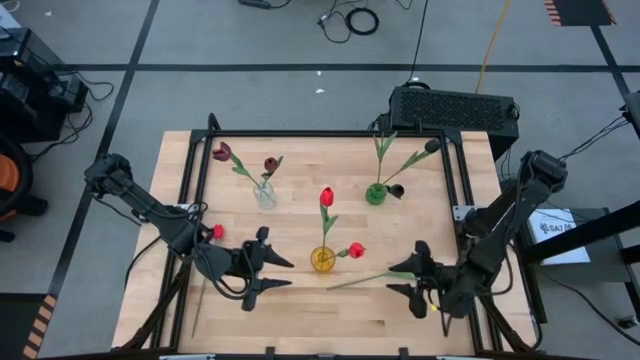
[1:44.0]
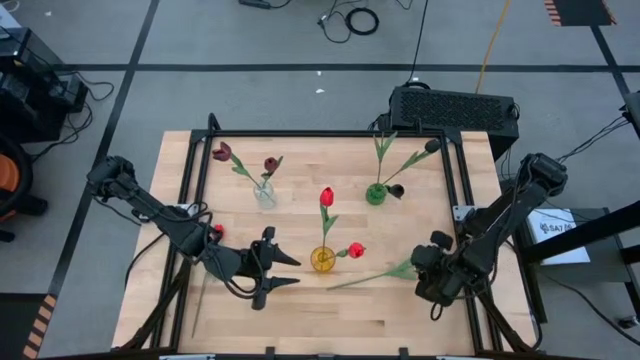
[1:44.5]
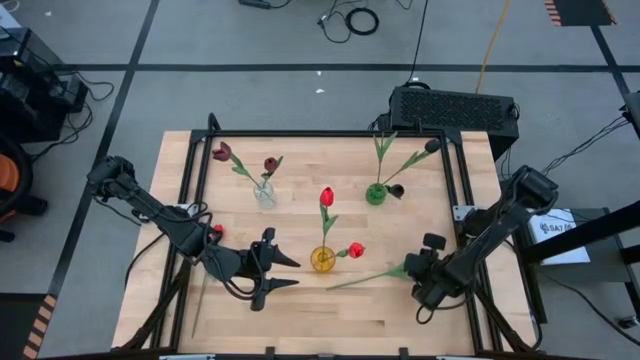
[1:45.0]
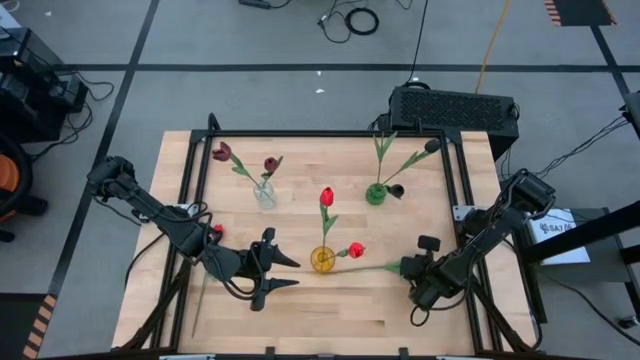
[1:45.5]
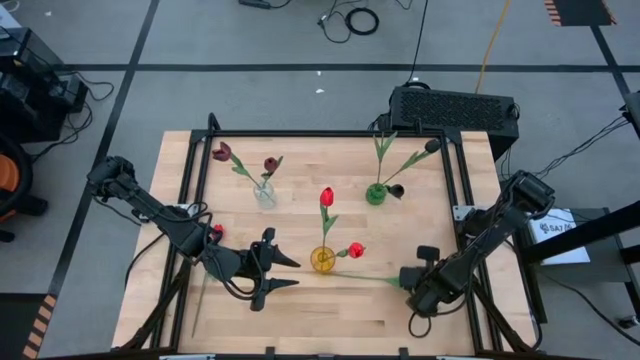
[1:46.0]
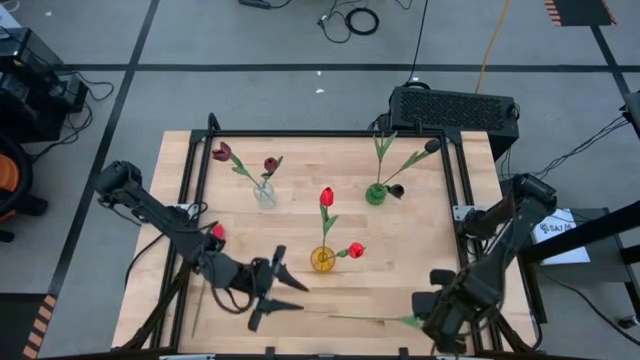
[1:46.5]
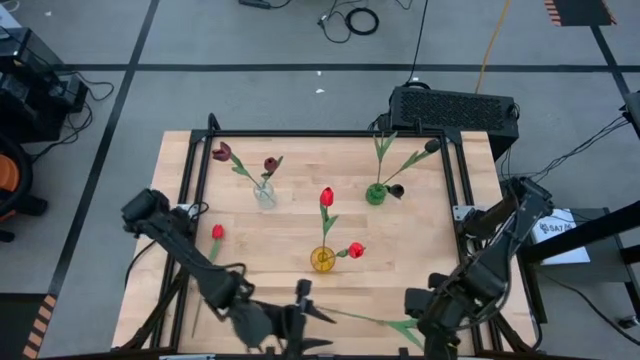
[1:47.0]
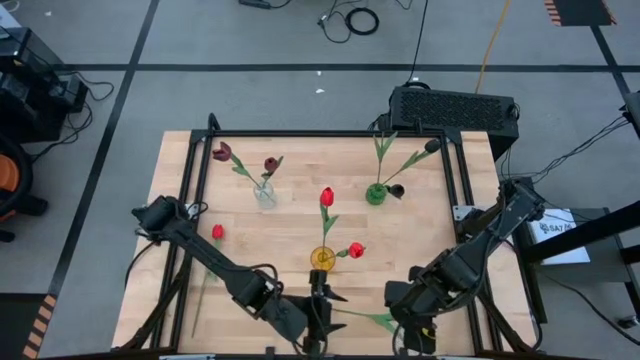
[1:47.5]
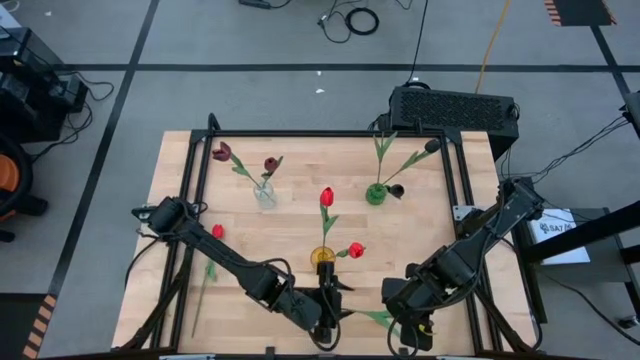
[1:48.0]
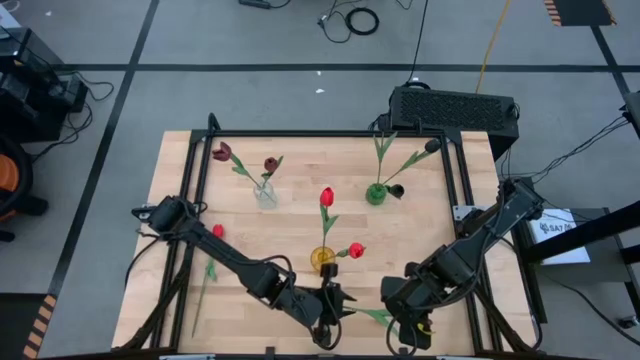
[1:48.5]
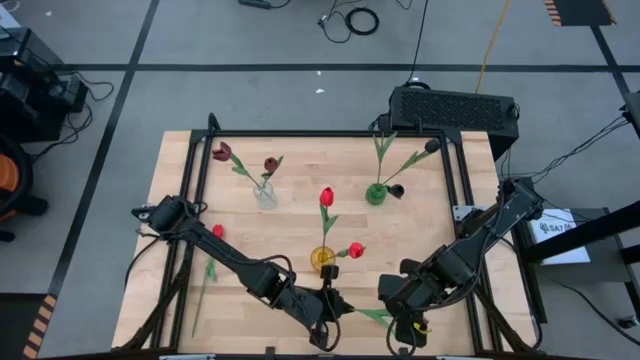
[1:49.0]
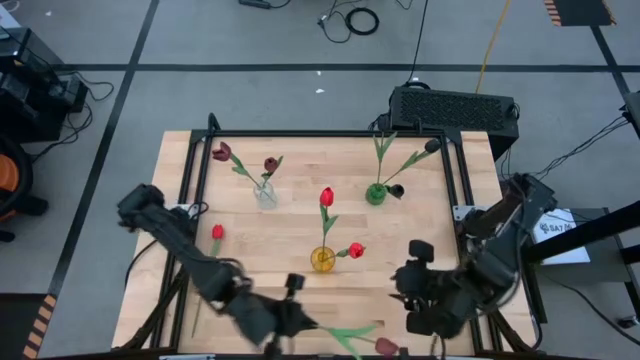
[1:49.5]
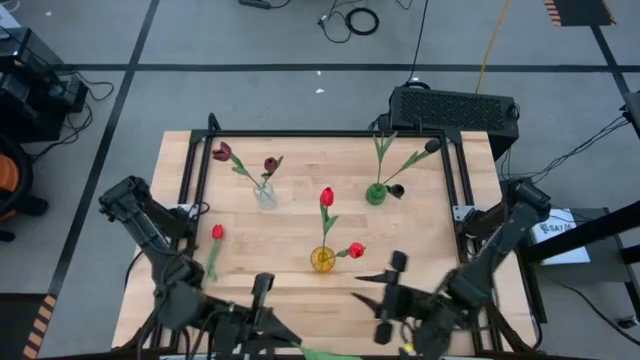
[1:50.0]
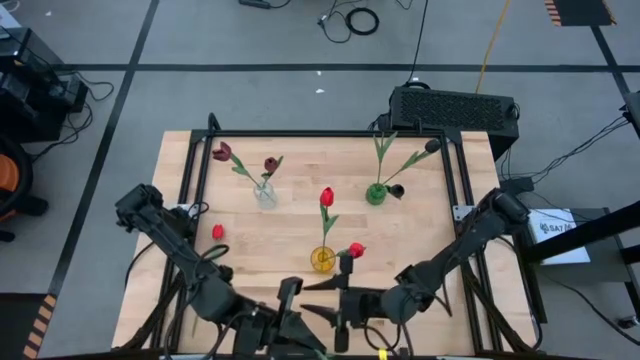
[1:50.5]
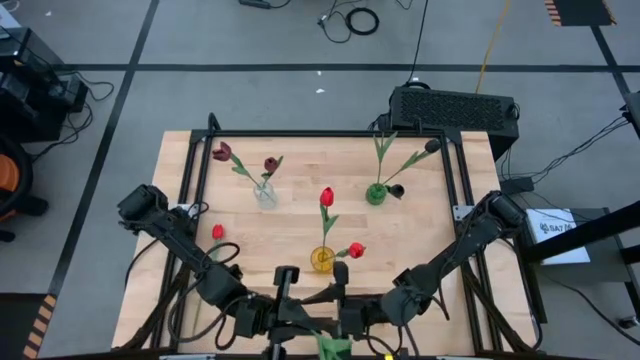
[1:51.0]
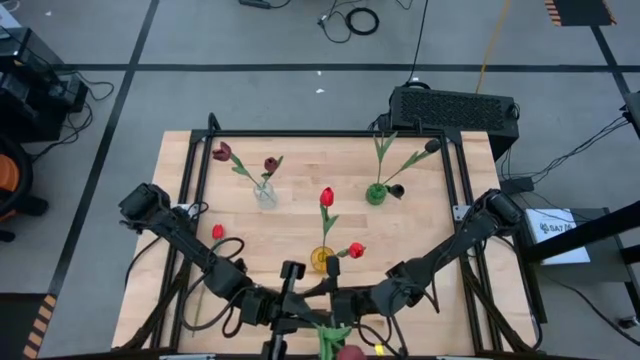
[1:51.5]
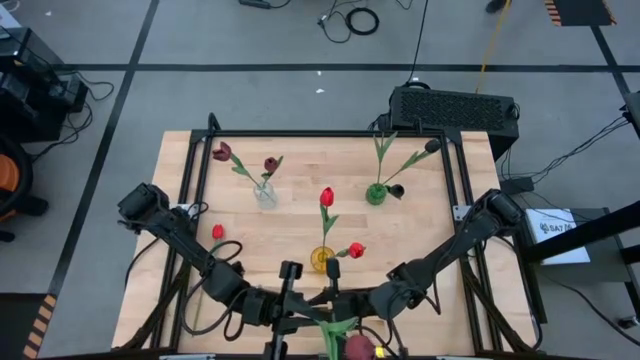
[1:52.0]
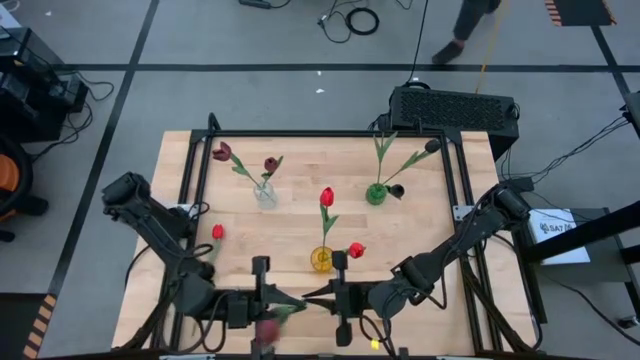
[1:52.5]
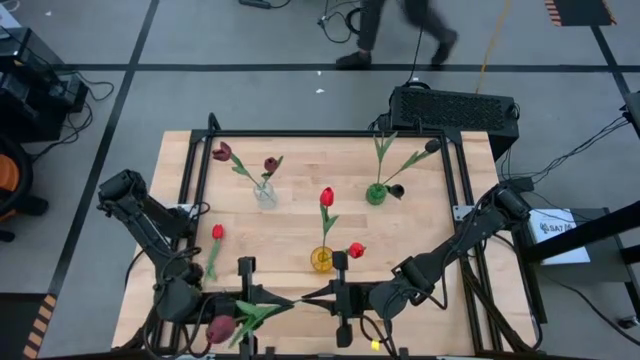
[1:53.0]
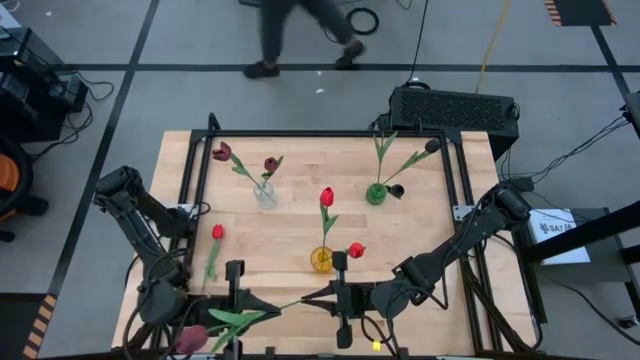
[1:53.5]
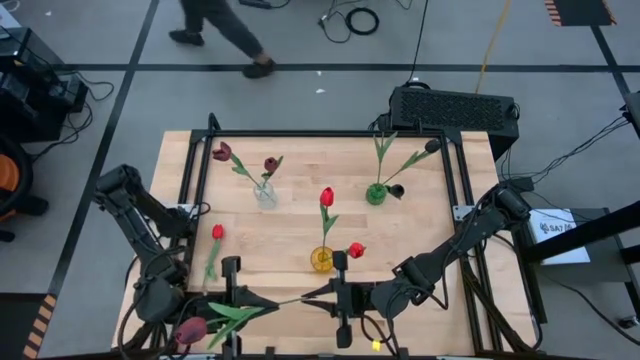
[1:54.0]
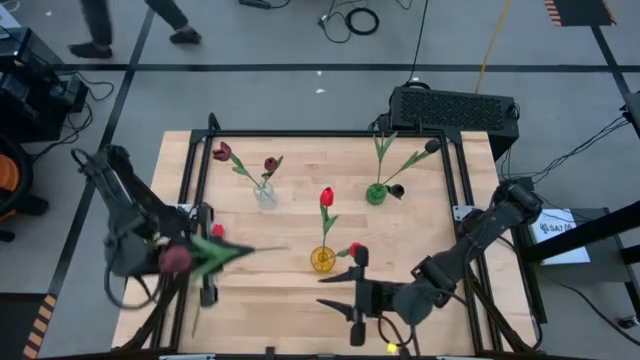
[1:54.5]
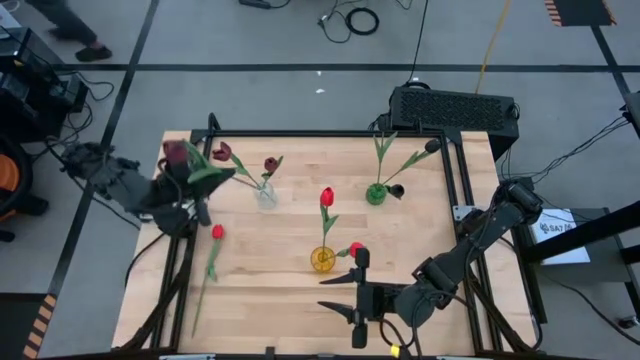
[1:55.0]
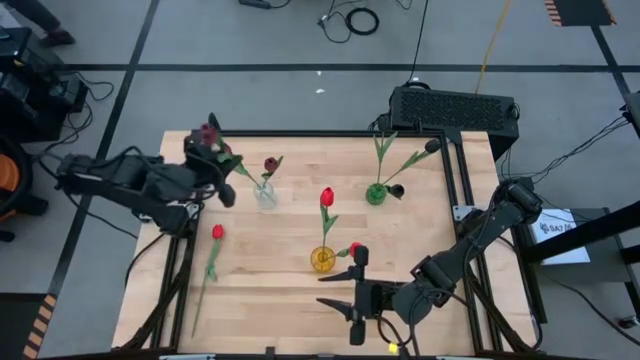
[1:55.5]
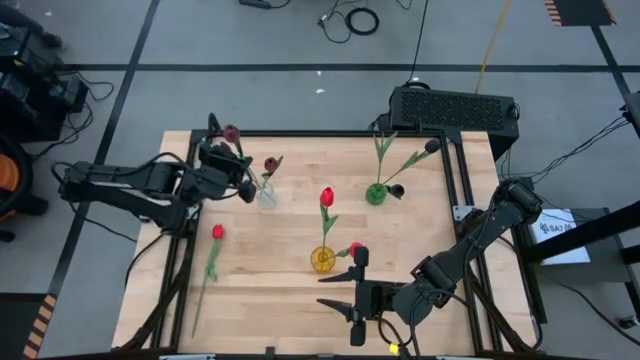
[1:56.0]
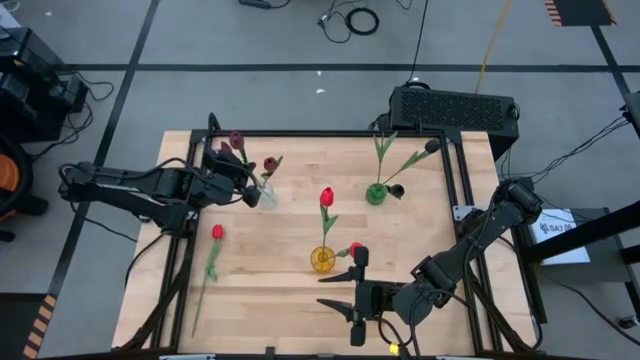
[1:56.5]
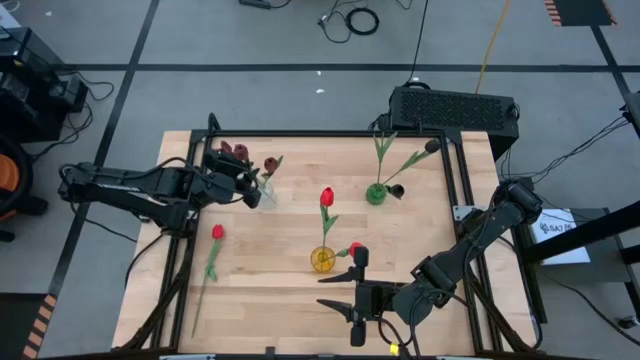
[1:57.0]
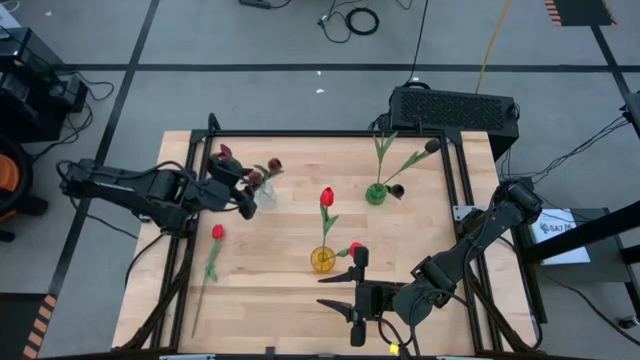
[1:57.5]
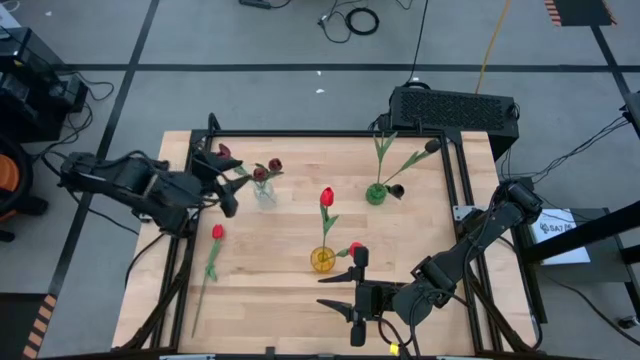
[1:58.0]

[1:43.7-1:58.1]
Task: Sort flowers into vase by color
Put the dark red flower into the transparent vase

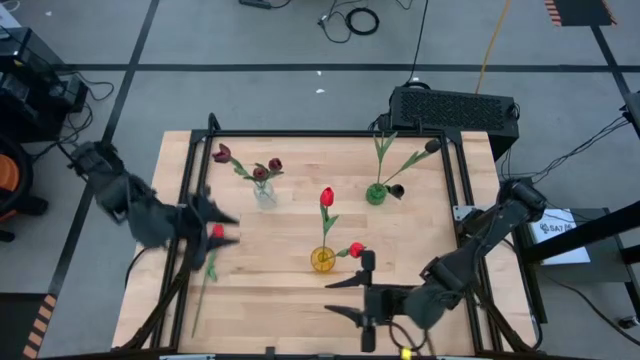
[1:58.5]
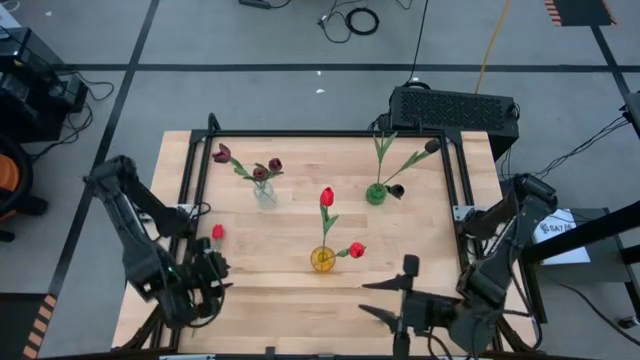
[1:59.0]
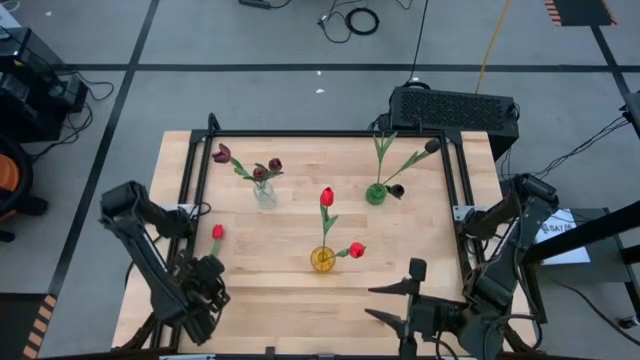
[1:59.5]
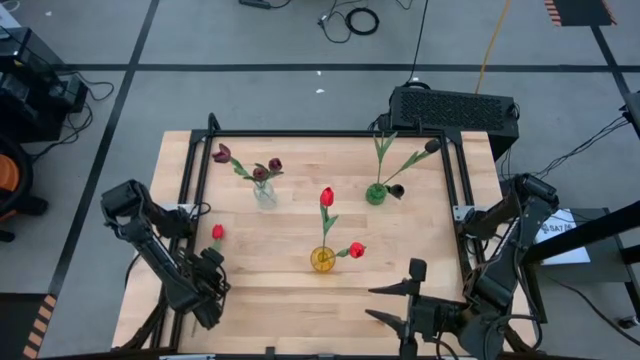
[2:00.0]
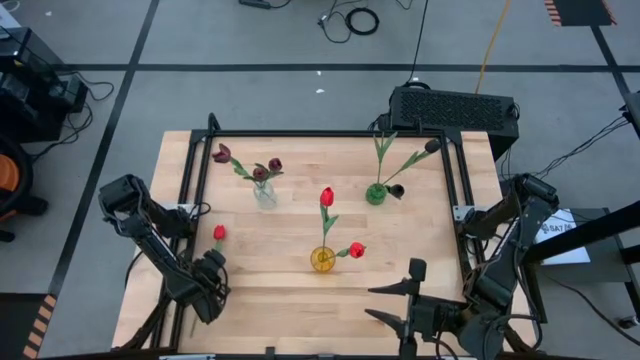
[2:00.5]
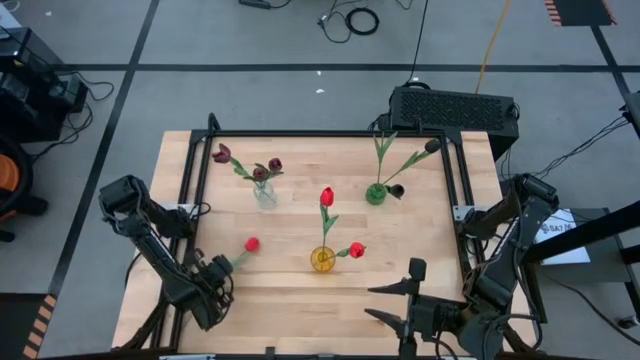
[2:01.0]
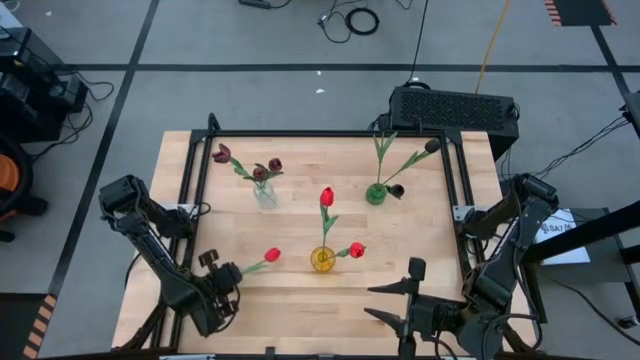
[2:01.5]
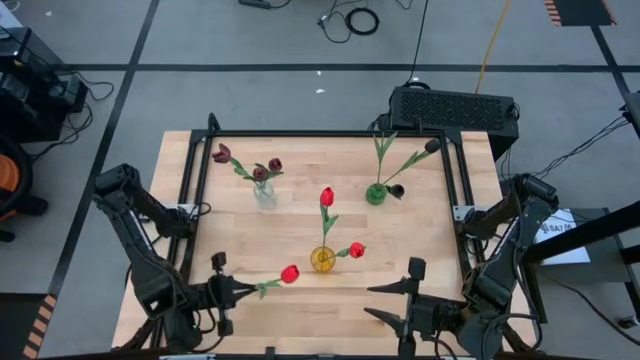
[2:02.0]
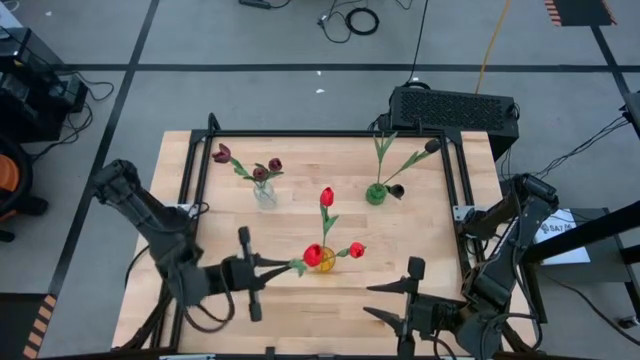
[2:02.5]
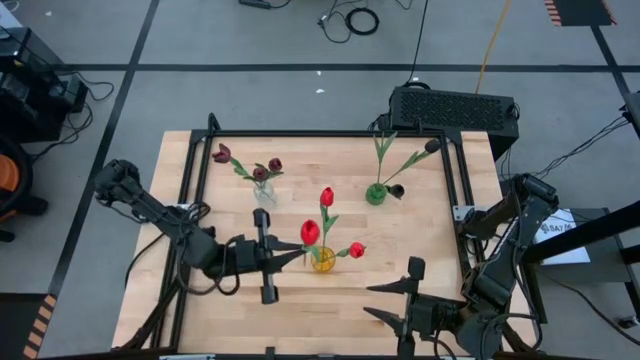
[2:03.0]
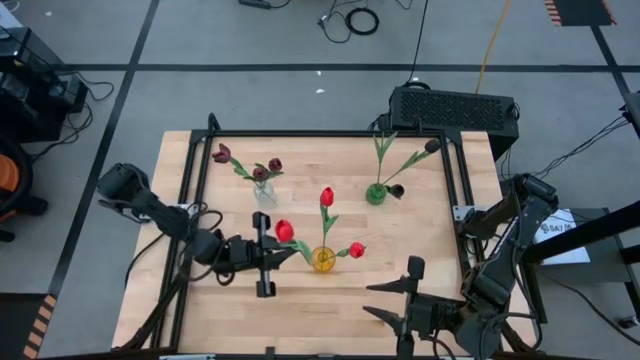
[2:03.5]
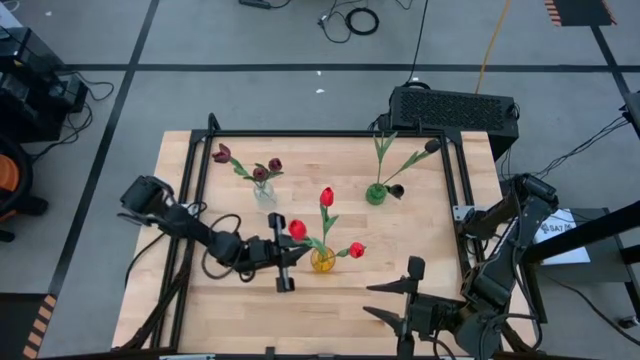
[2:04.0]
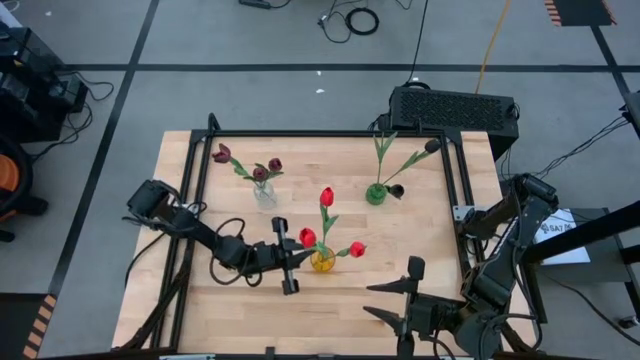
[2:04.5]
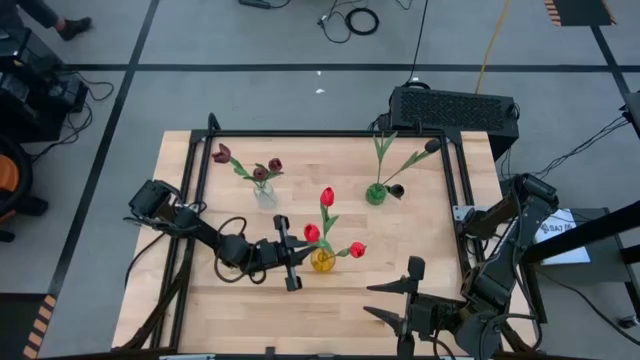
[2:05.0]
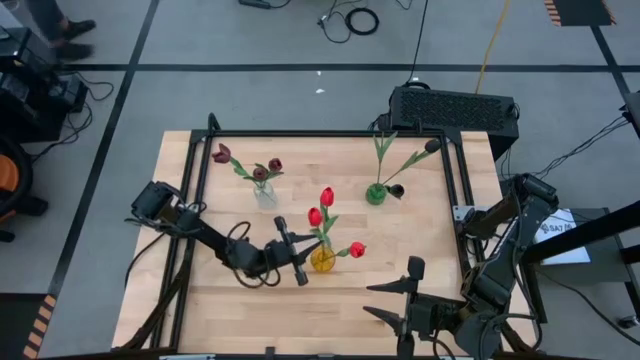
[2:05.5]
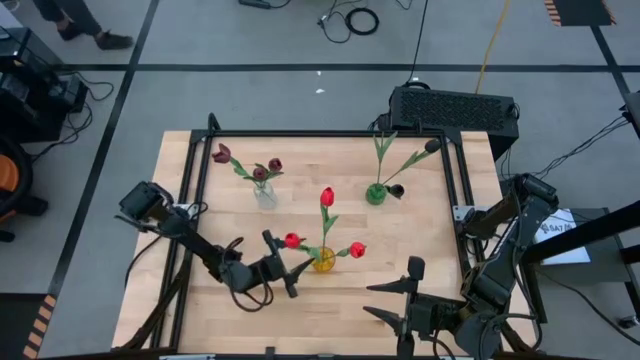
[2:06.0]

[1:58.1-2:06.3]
Put the red flower into the yellow vase
